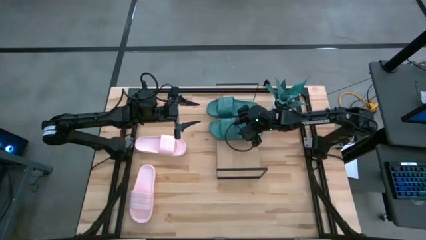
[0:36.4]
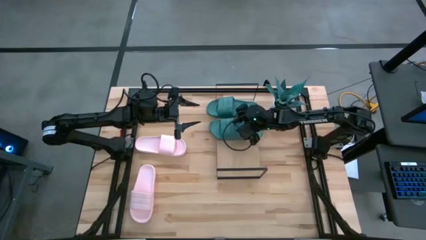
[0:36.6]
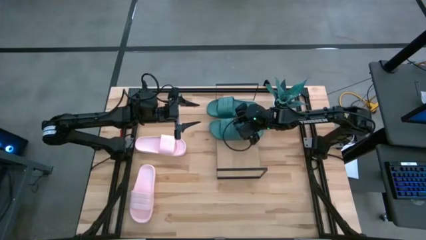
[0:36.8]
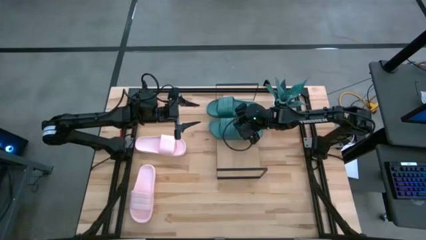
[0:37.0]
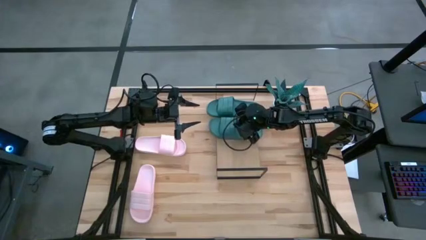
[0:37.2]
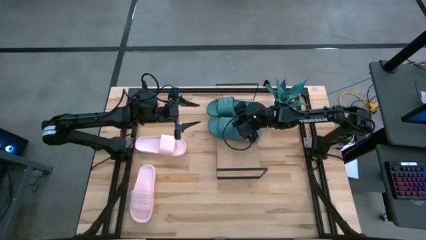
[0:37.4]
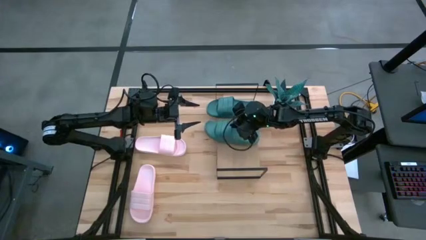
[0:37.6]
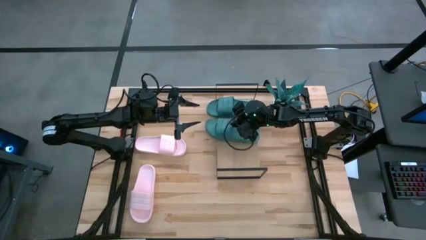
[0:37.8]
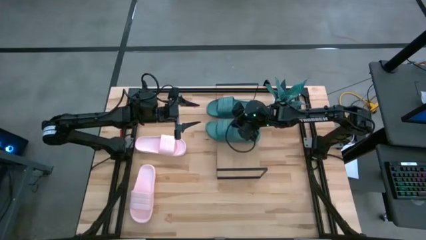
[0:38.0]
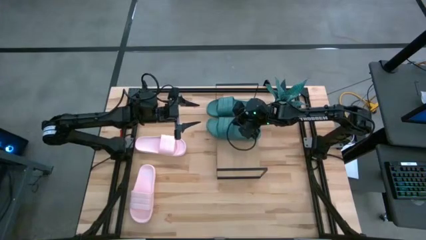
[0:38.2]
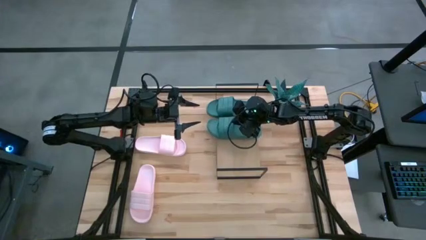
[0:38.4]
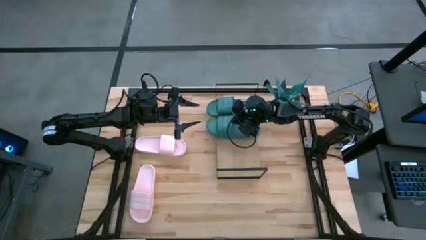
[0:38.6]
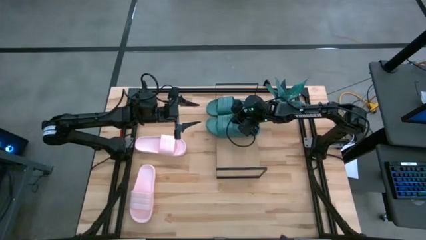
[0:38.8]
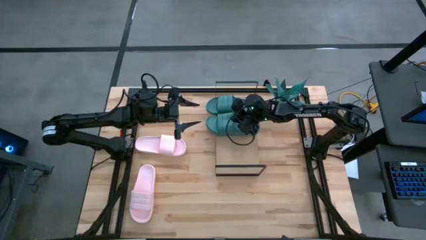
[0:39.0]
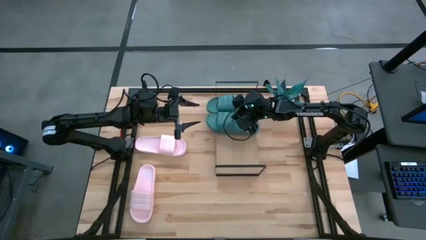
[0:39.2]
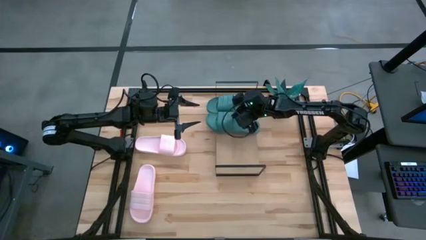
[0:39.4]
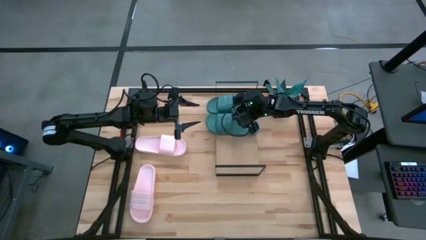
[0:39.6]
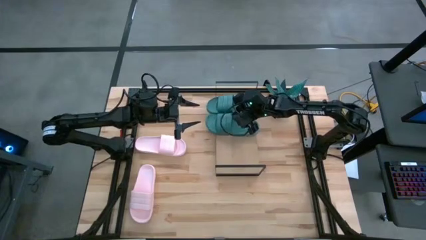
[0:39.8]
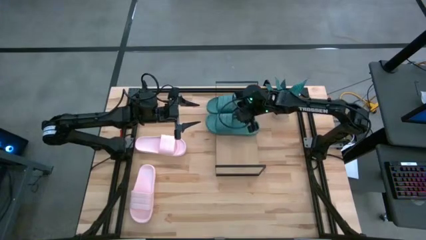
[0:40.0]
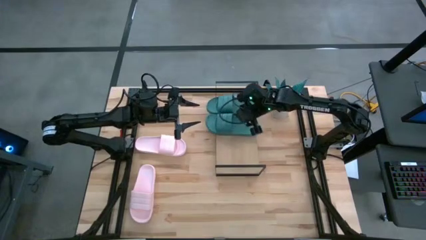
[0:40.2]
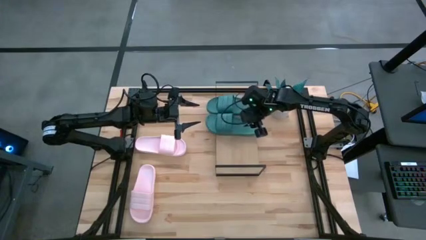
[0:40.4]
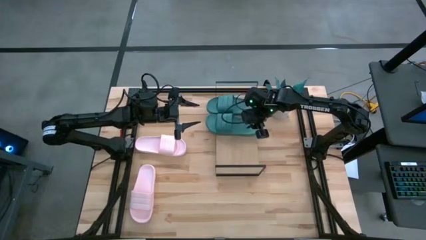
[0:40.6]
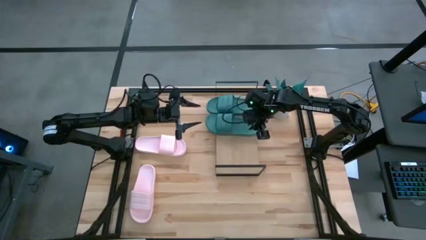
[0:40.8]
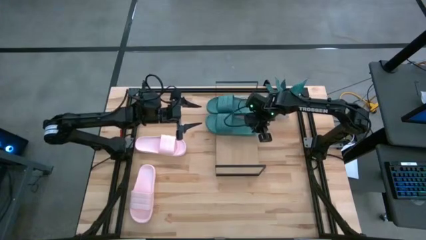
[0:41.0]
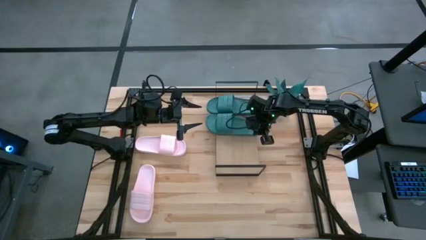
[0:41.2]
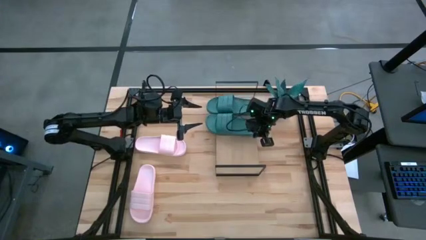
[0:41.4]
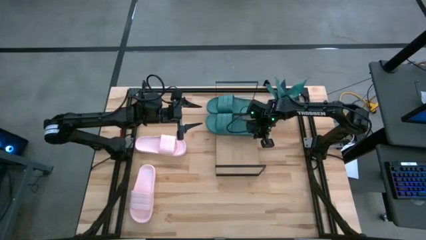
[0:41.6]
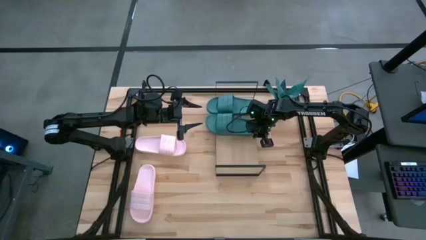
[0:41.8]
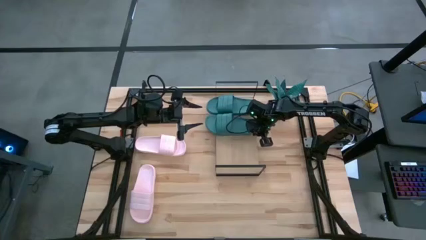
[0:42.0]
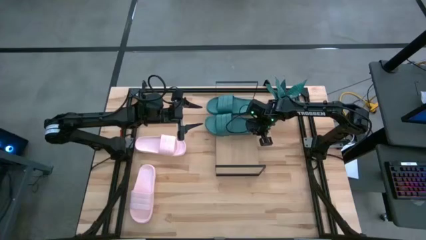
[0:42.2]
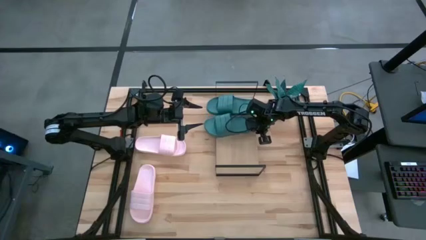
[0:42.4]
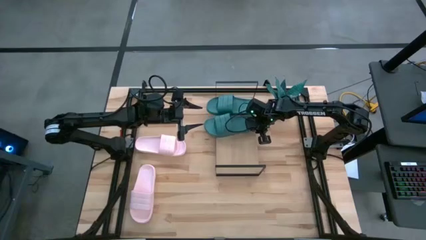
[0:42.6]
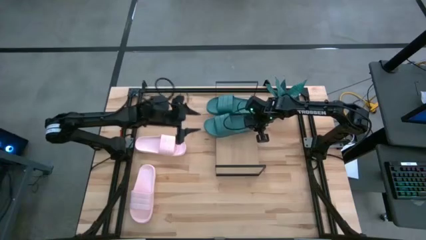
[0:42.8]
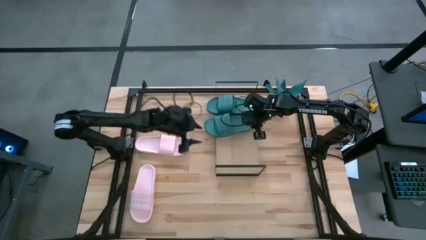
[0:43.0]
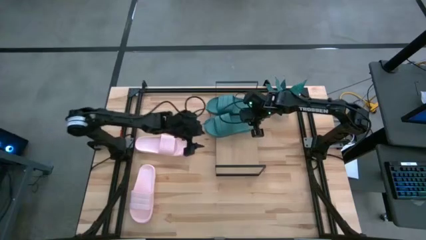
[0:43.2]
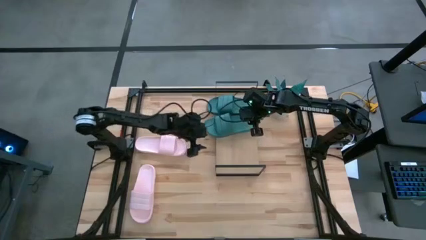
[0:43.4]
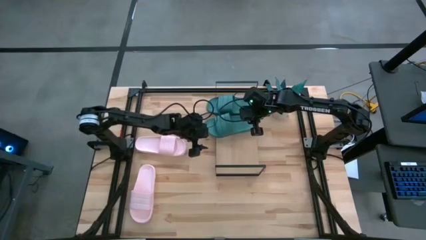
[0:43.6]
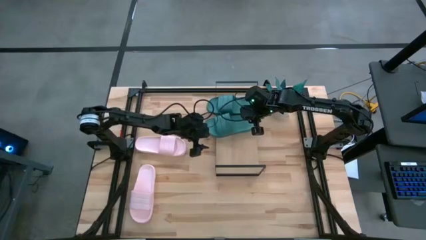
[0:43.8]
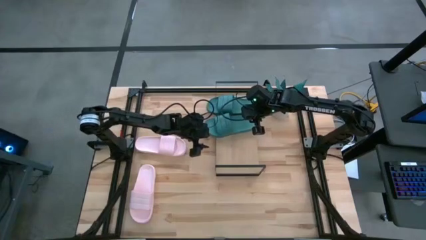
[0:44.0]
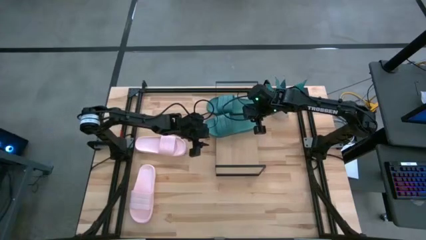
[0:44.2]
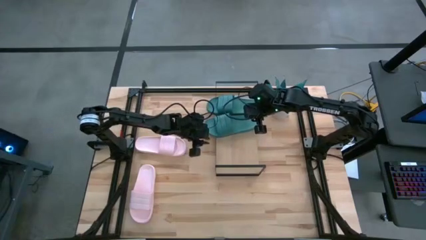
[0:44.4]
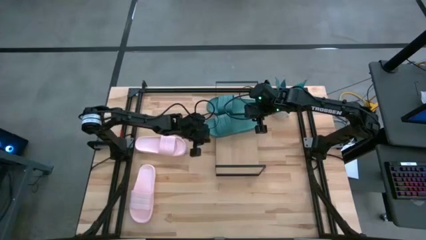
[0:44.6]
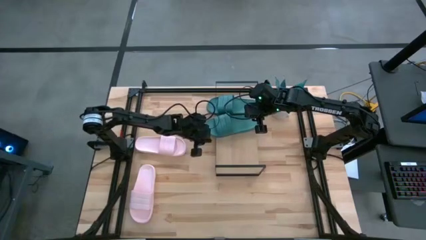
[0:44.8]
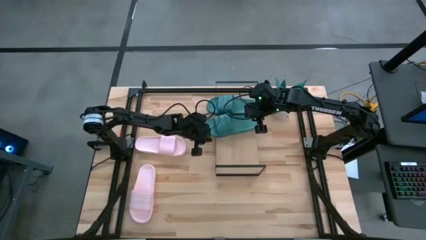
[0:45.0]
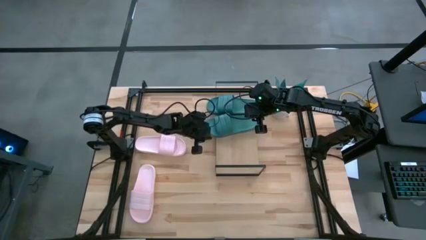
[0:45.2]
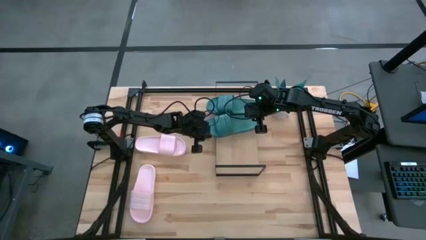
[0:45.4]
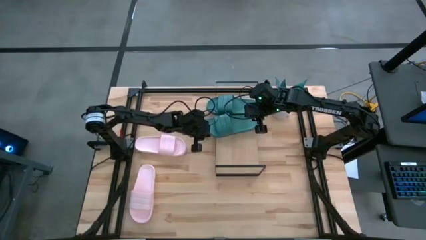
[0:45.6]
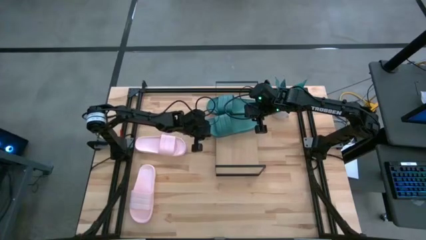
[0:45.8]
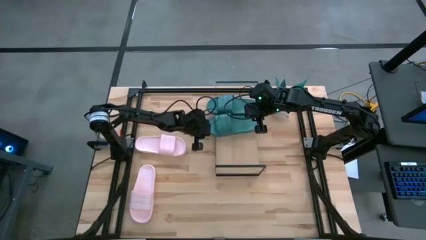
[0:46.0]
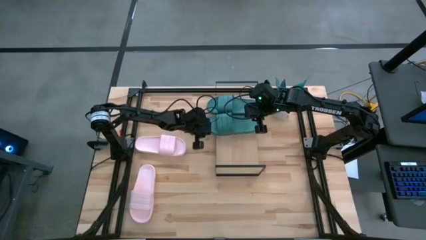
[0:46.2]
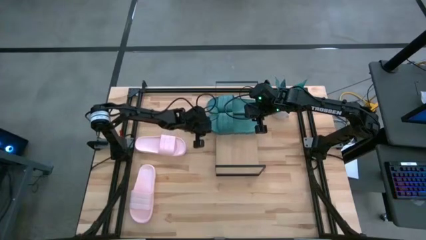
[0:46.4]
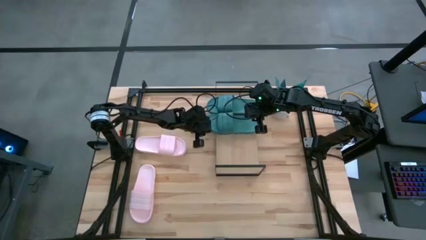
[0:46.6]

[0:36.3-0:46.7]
Task: Pick and place slides into the shelf
Put the blue slide on the shelf

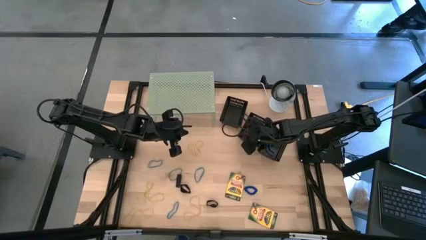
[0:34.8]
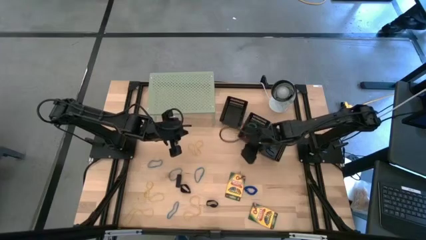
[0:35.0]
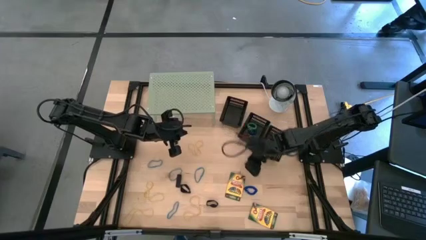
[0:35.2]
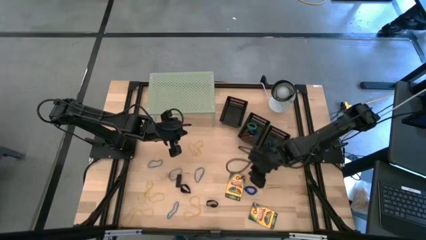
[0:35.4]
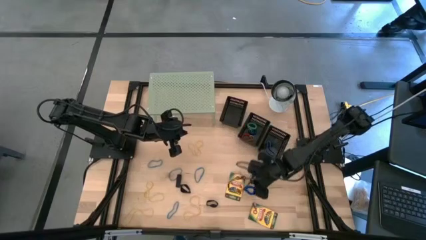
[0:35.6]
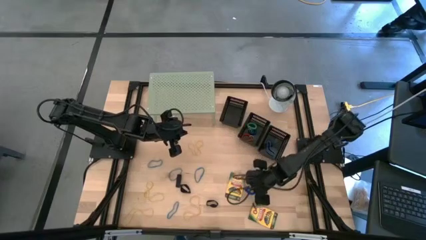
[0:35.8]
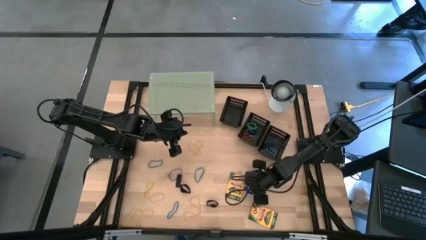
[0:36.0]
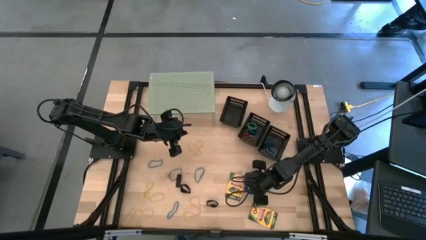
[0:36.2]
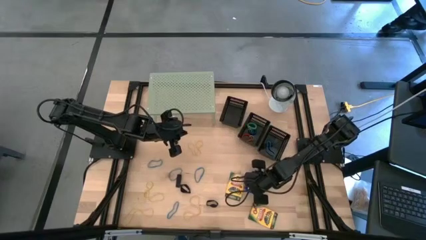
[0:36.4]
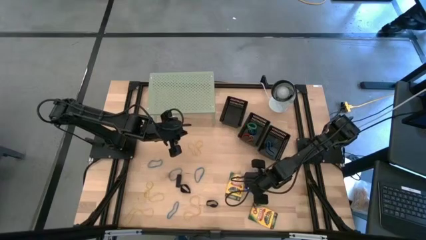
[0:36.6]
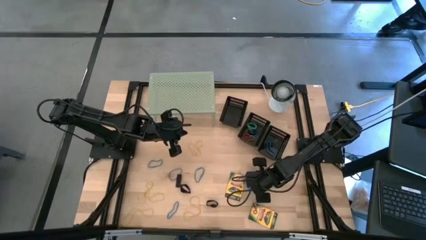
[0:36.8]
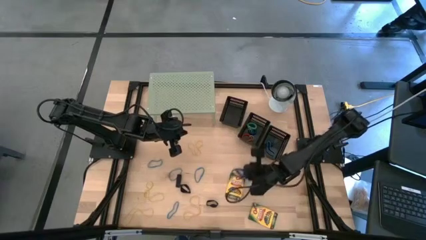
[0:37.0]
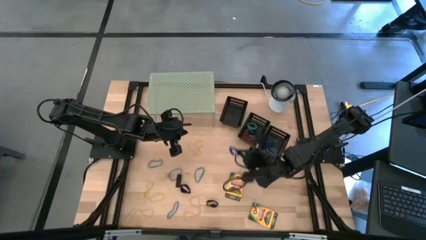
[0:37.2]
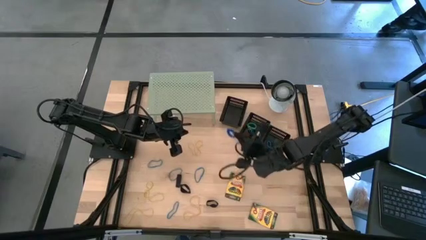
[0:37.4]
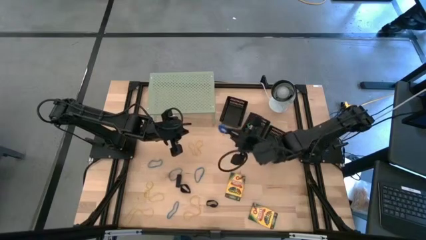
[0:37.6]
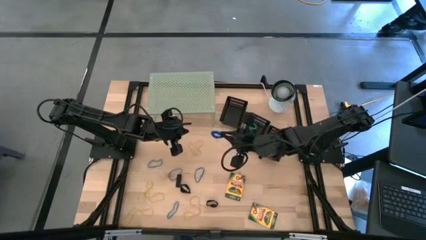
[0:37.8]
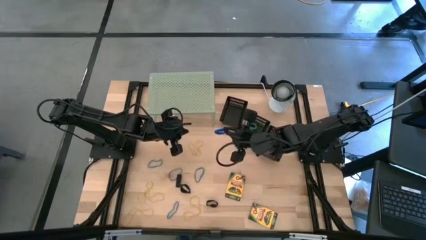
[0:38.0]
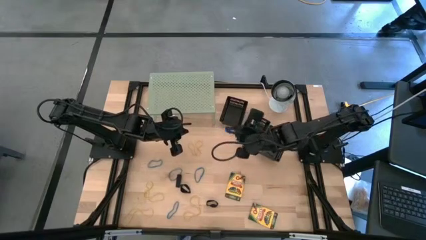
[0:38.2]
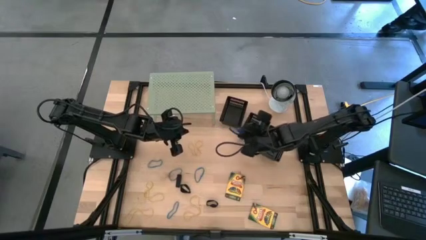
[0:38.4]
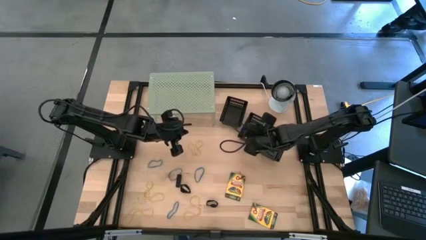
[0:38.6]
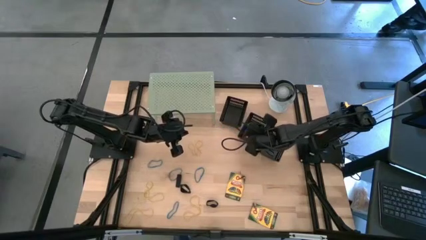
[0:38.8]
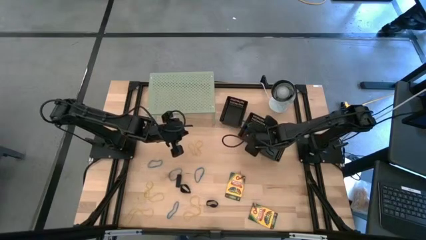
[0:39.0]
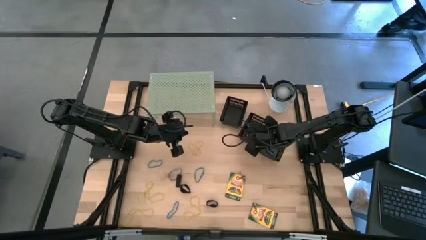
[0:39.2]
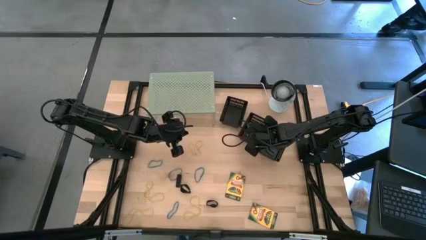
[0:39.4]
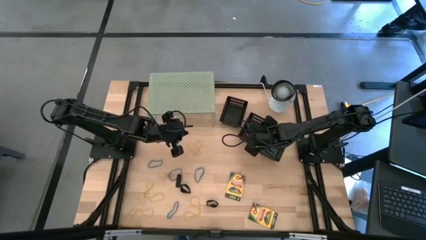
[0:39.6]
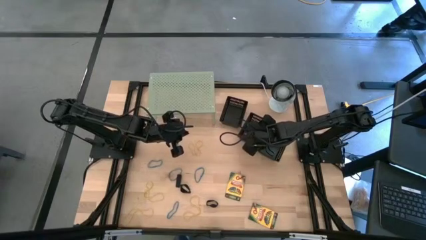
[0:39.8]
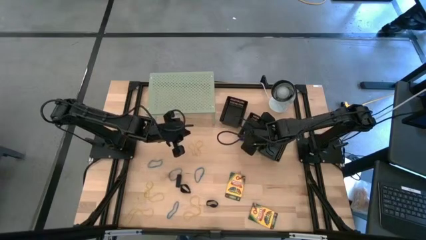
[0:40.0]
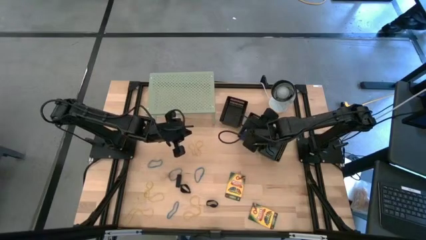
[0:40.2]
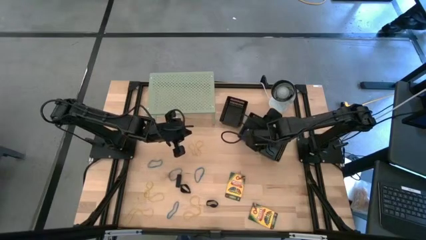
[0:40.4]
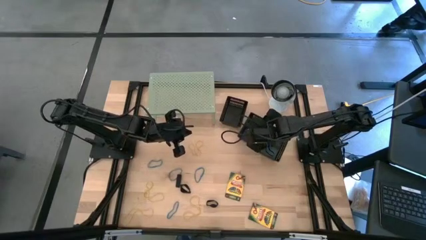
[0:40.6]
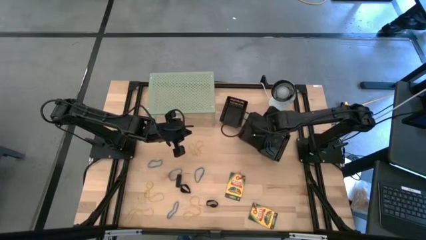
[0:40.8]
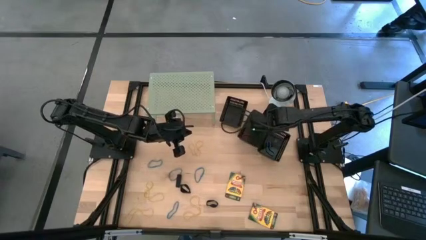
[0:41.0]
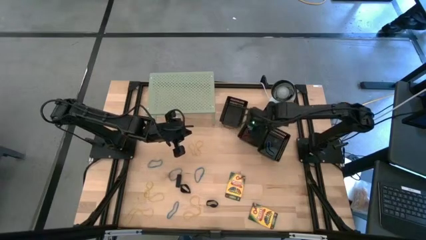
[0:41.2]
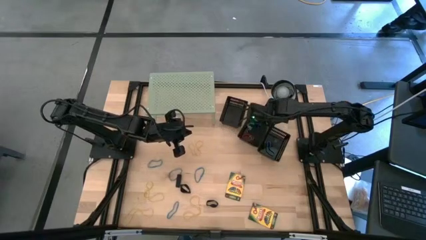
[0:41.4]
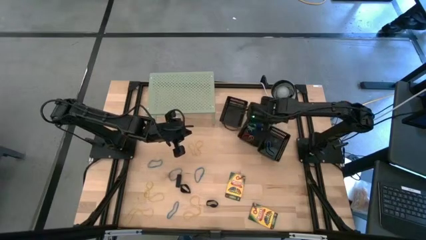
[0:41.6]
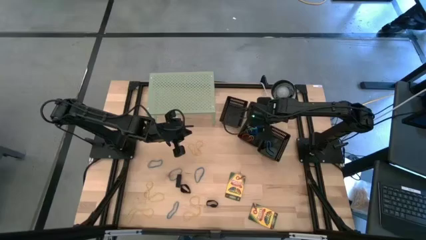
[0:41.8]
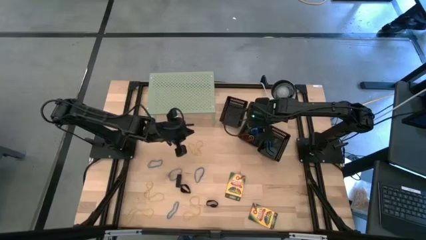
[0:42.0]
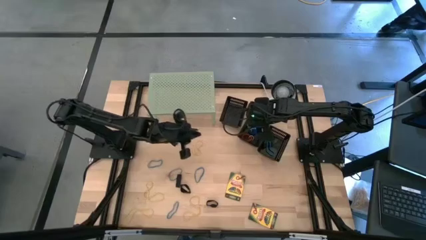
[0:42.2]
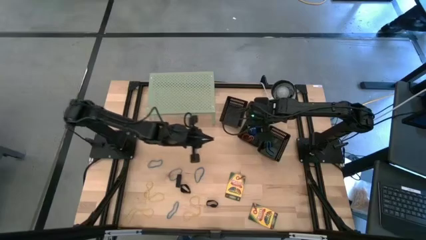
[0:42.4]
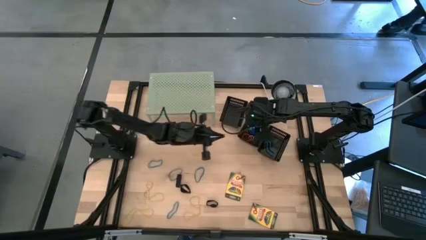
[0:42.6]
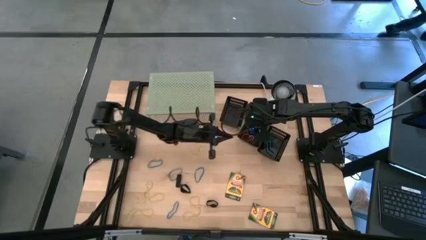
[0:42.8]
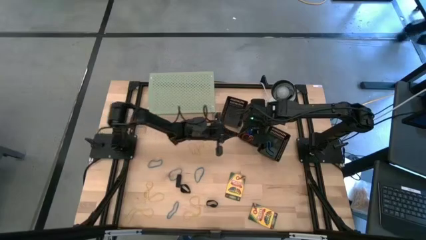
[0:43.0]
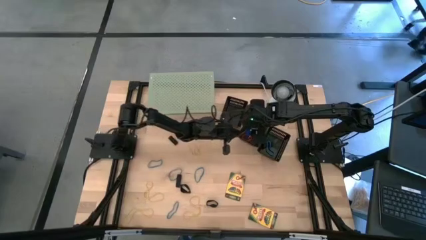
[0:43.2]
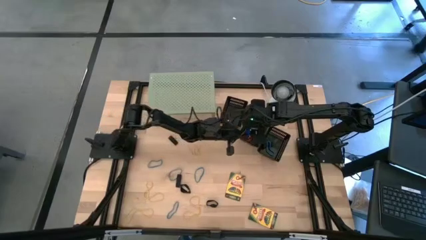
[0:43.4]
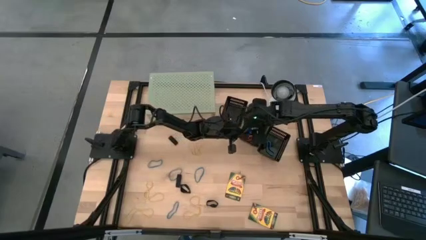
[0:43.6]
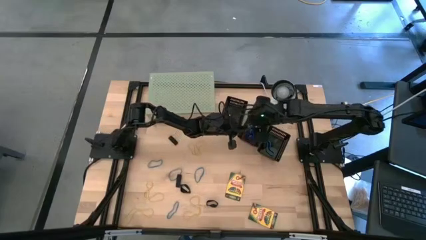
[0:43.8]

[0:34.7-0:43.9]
Task: Pick & Place Office Desk Supplies
Put the blue spring keychain into the middle black bin
